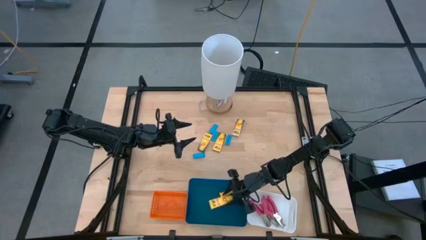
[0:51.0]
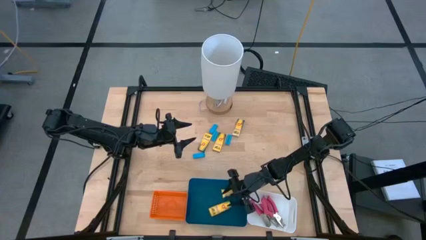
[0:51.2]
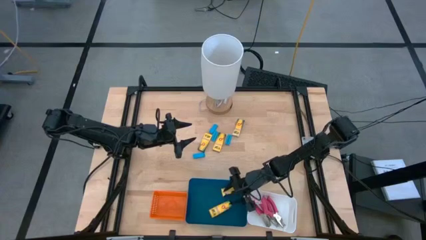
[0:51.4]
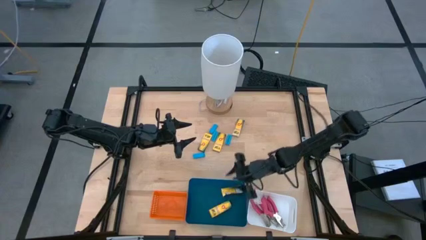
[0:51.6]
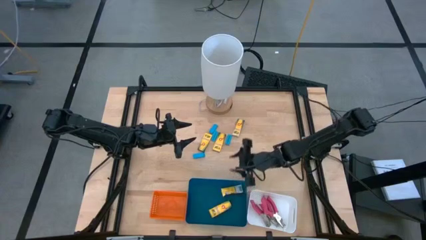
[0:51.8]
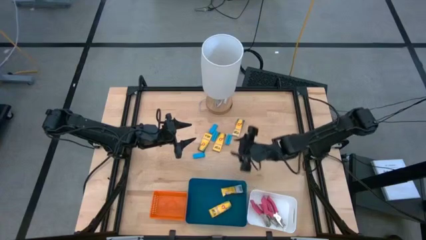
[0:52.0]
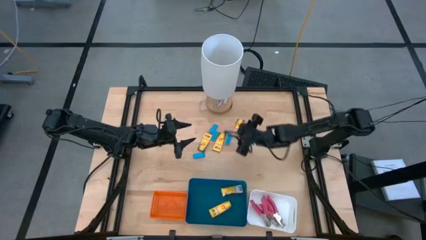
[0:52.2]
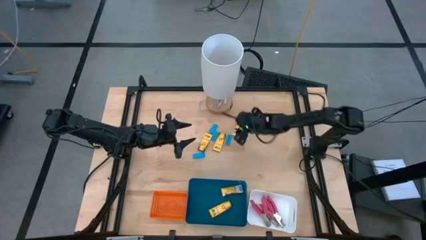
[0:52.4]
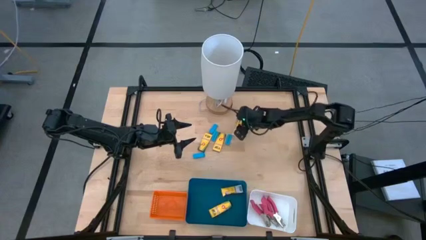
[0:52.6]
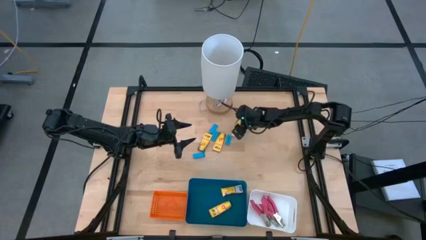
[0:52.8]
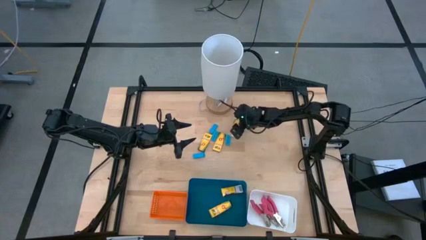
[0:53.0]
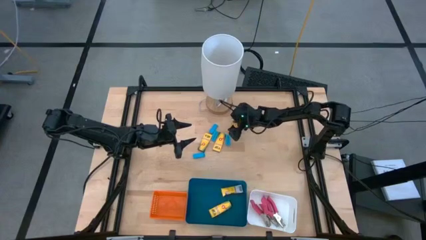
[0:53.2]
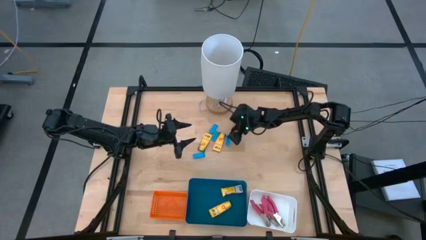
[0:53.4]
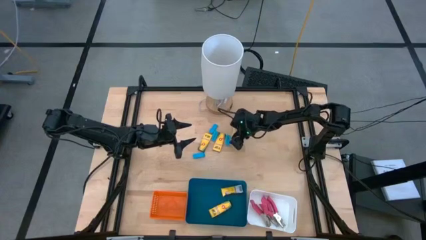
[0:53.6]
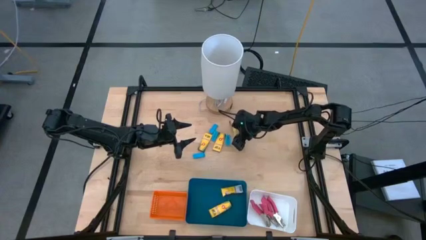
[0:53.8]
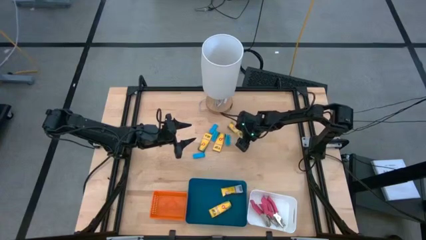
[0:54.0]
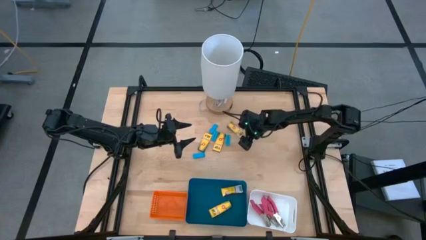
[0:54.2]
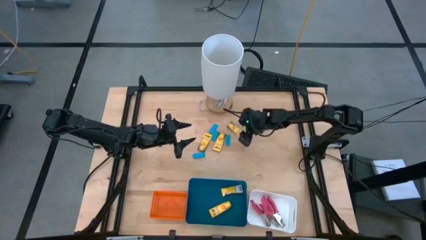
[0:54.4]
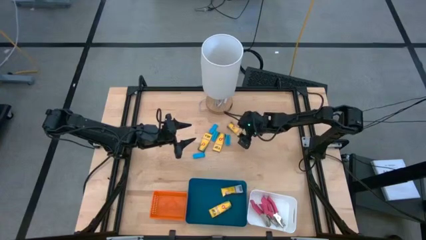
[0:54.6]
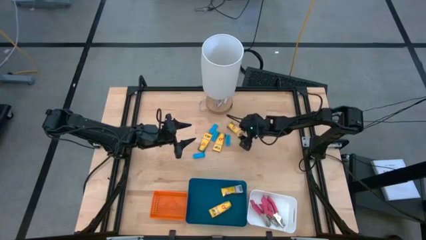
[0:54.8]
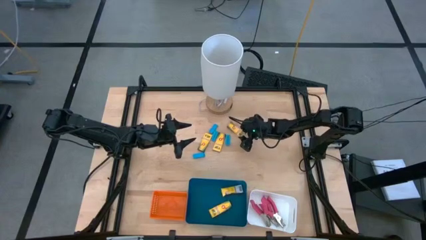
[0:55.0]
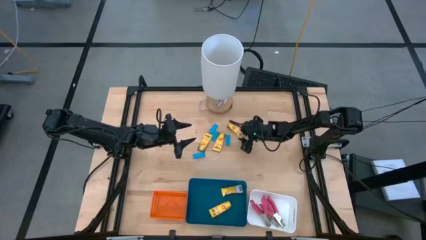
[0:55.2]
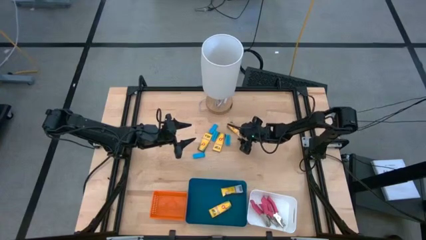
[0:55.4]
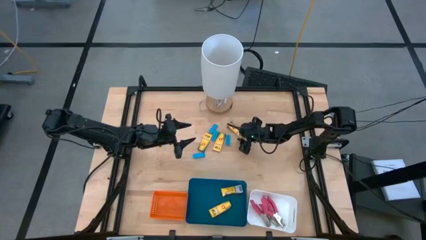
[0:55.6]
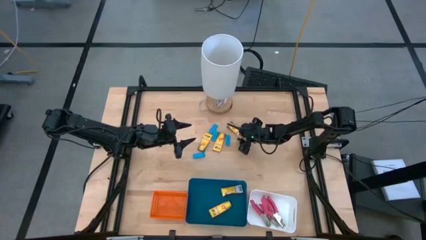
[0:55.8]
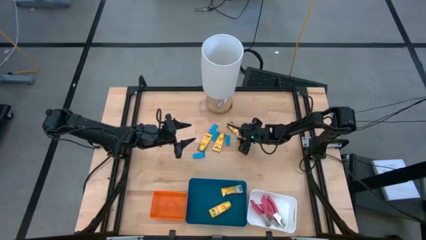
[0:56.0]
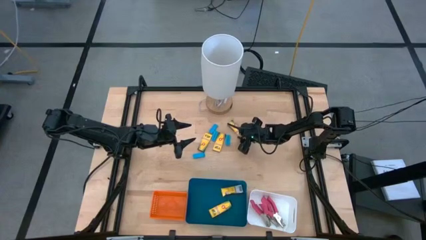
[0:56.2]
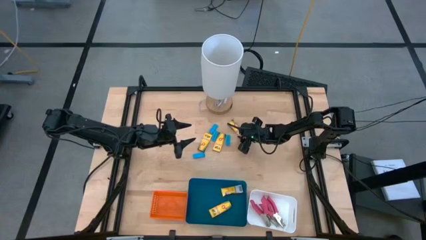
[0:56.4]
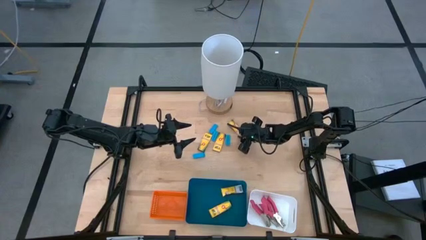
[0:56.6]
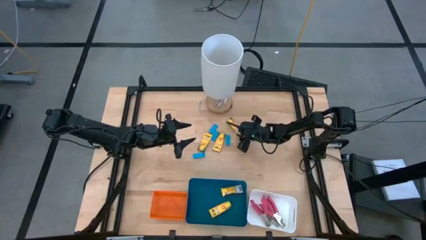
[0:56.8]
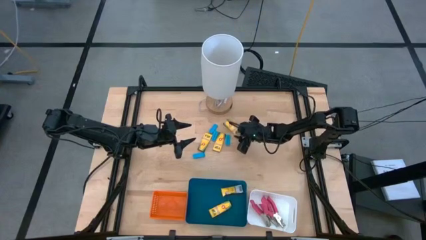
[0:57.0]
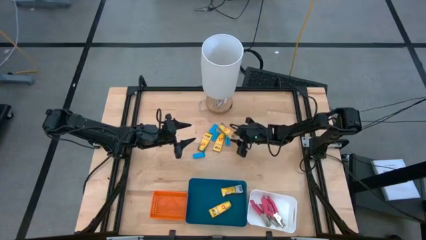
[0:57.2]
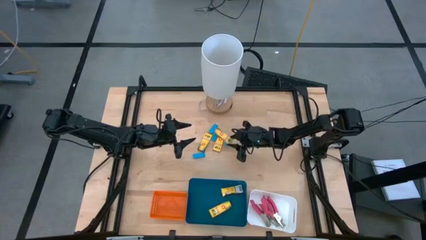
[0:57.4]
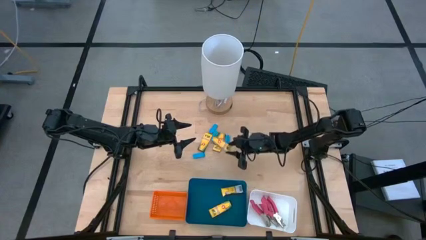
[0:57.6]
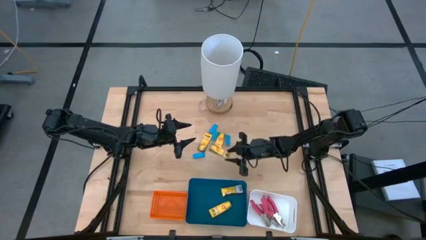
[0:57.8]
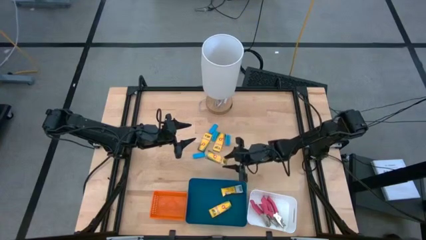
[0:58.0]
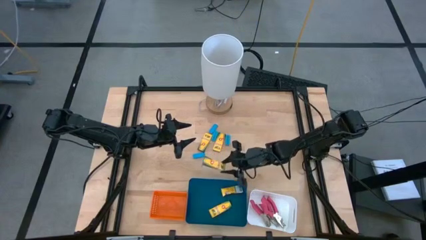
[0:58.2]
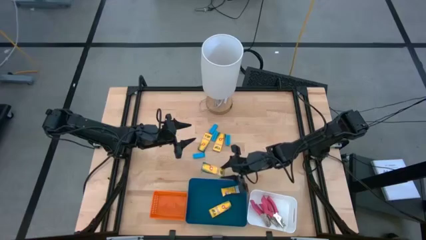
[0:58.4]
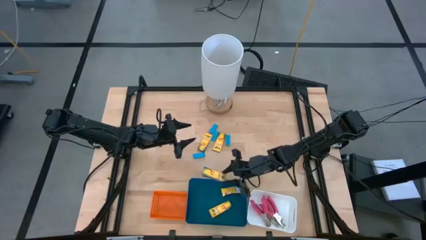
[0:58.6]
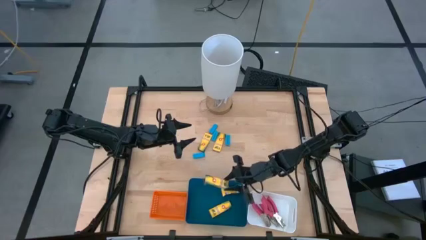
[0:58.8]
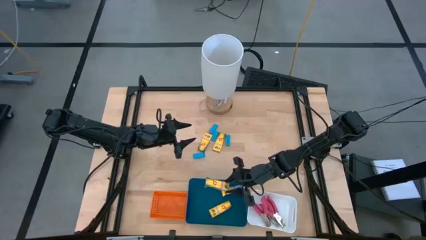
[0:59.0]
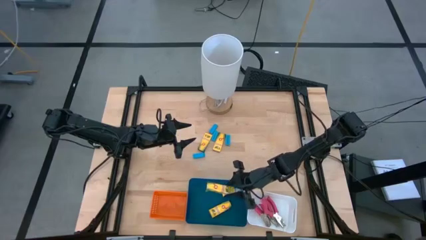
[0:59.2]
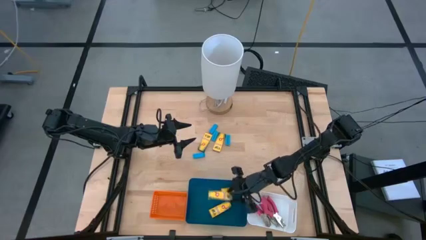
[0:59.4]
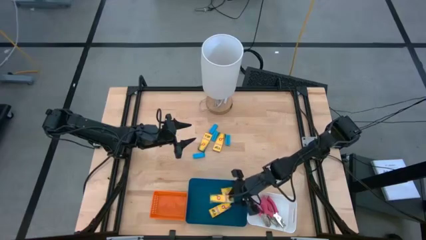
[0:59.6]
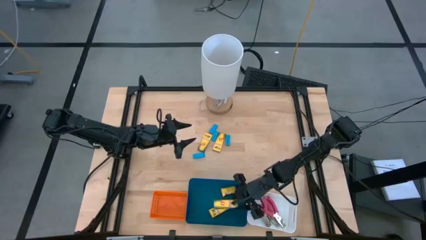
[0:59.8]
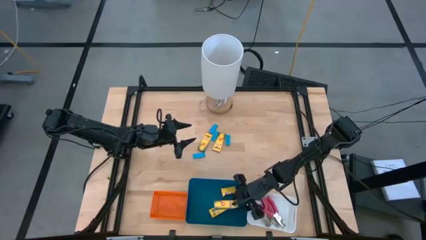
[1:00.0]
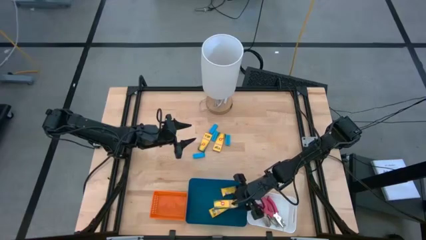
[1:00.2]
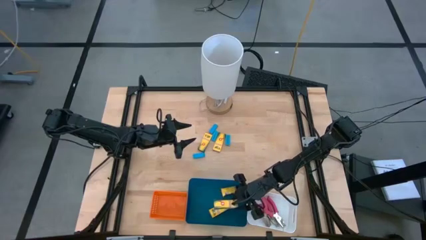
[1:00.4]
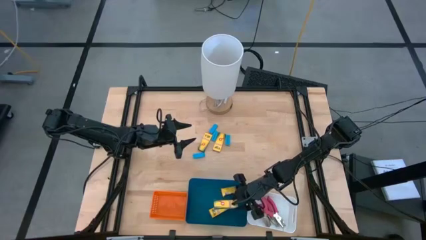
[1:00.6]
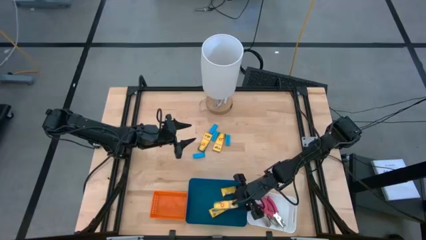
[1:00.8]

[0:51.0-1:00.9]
Task: Pick & Place School Supplies
Put the yellow crayon box into the blue bin

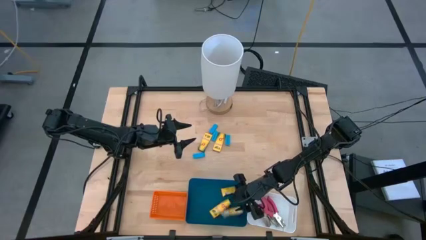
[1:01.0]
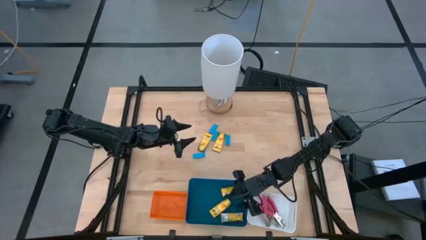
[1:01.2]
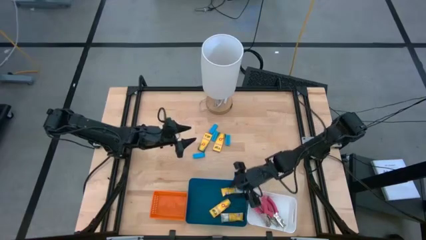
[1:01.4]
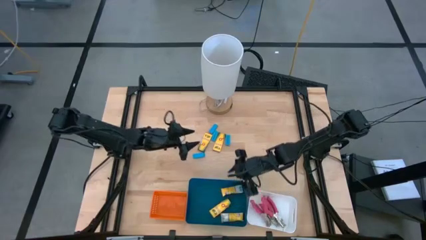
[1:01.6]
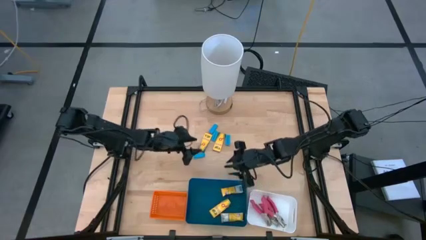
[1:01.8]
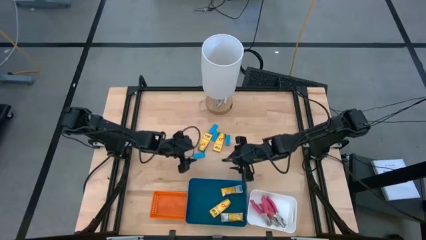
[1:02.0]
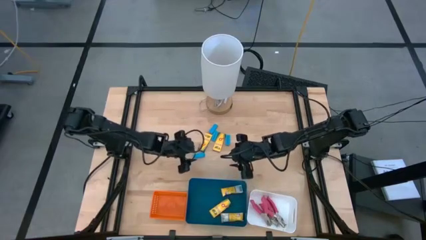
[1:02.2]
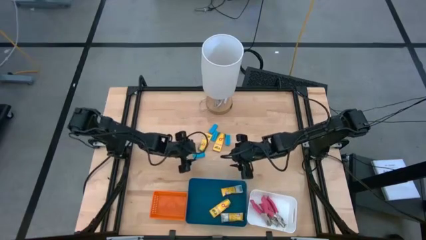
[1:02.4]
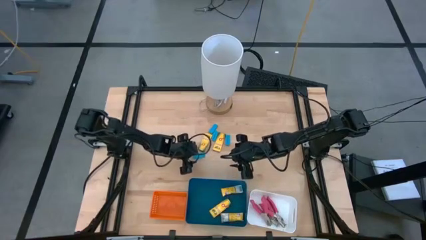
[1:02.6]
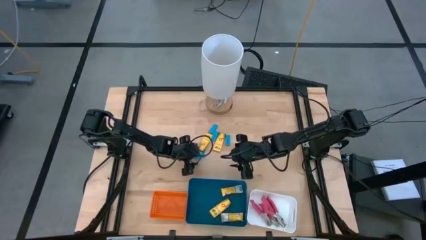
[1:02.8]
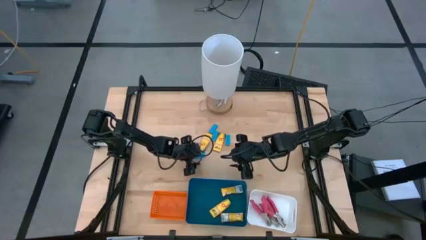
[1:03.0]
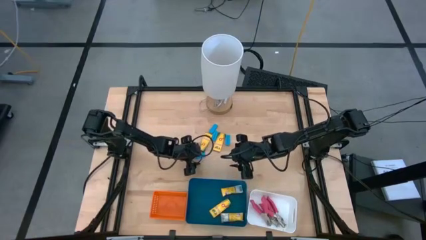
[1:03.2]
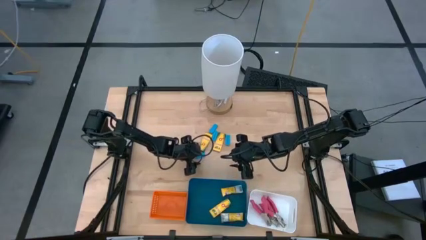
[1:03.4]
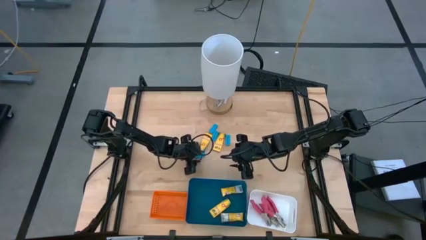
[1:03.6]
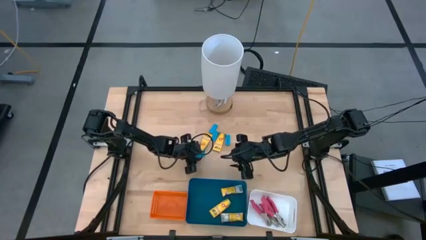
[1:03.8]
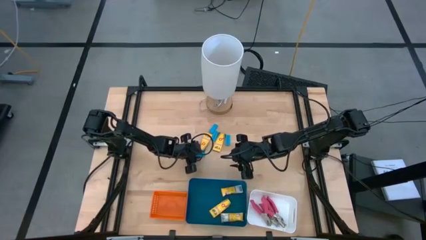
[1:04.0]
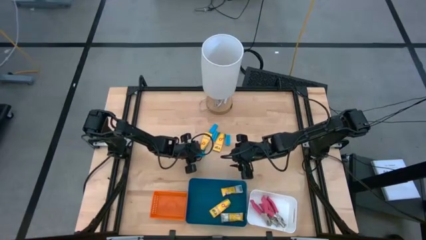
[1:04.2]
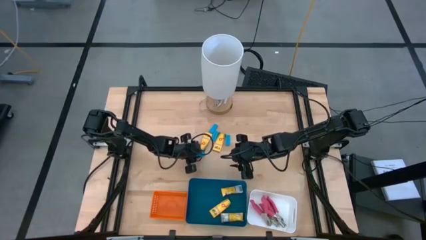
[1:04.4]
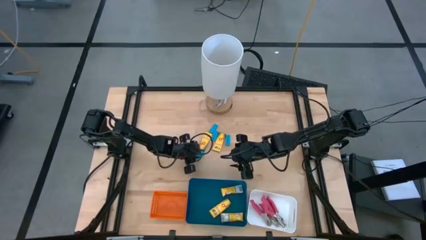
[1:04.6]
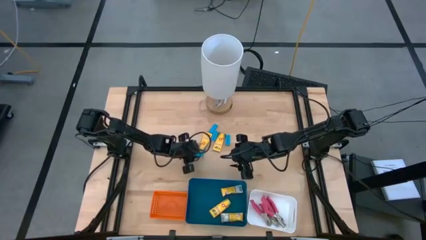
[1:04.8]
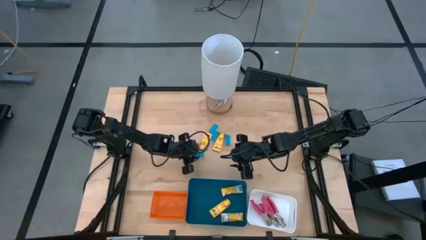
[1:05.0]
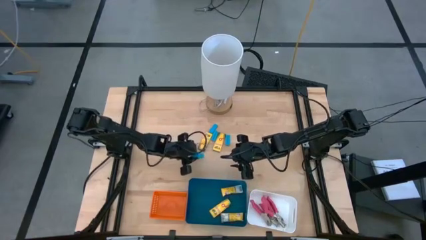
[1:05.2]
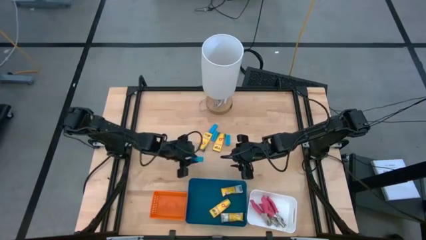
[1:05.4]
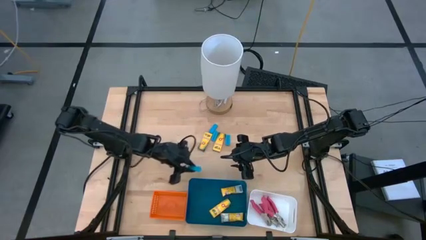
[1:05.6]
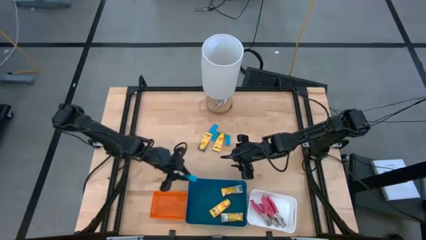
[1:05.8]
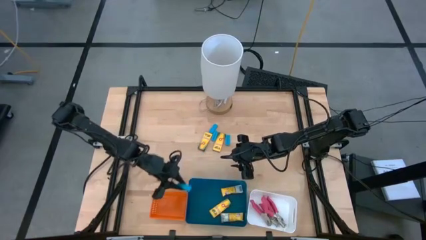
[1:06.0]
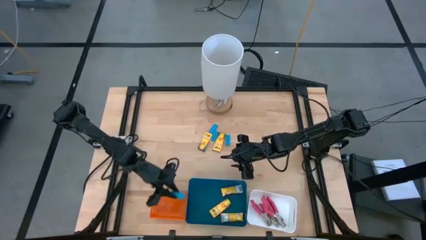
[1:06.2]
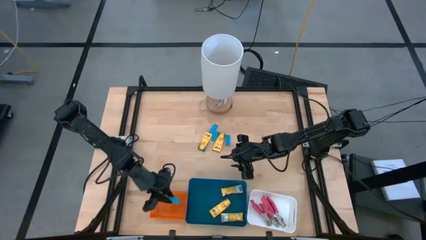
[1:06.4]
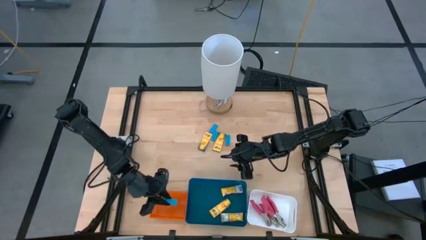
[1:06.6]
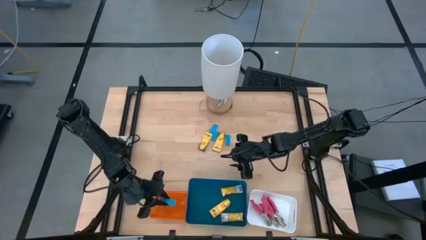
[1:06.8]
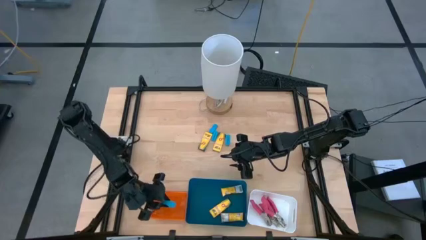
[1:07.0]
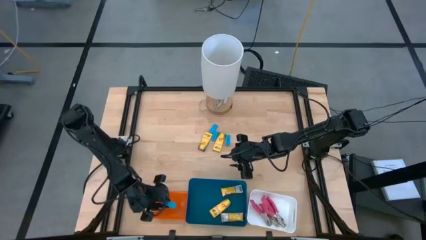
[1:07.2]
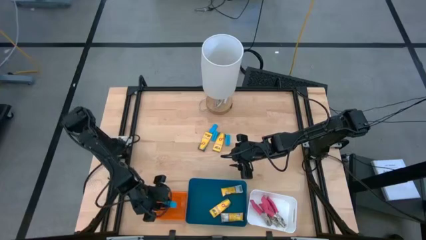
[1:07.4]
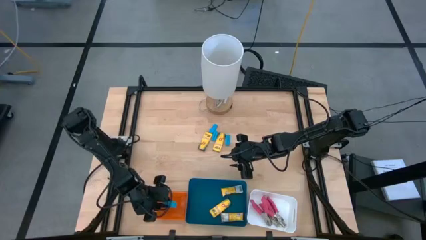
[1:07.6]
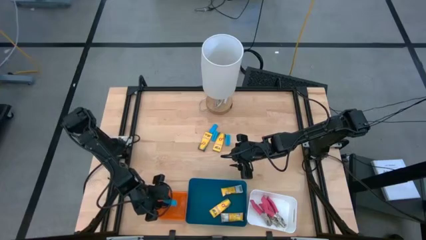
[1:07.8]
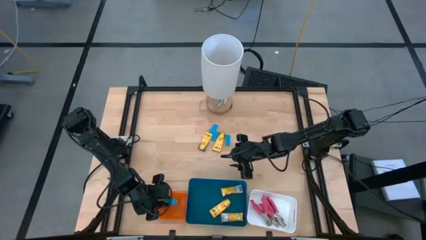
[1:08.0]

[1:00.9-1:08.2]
Put the blue eraser into the orange bin
